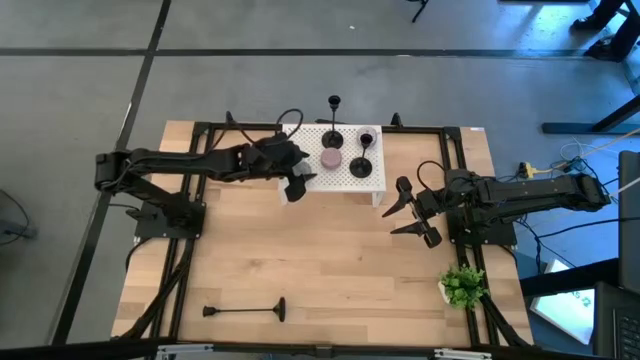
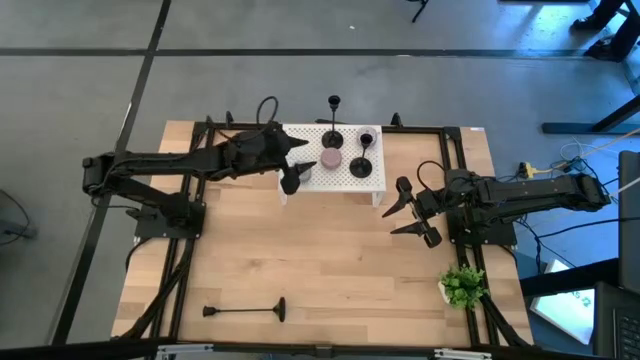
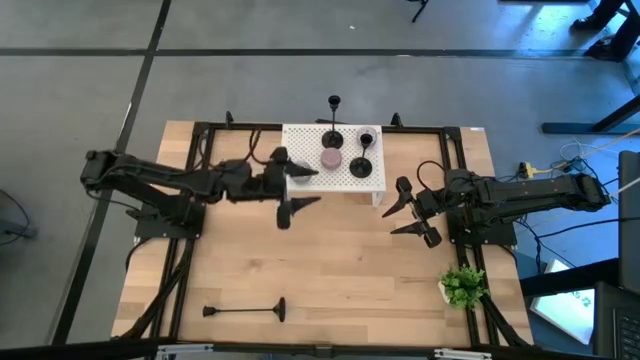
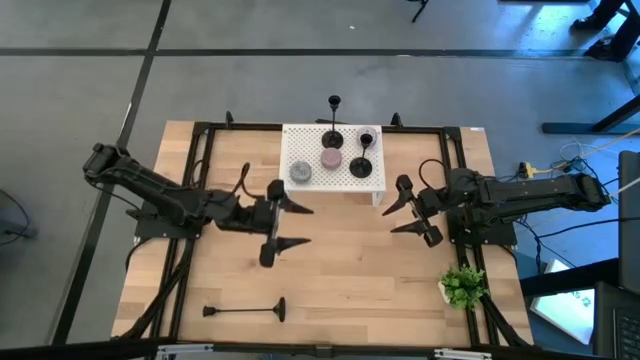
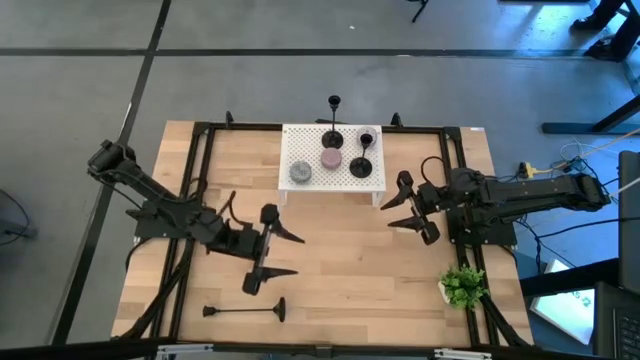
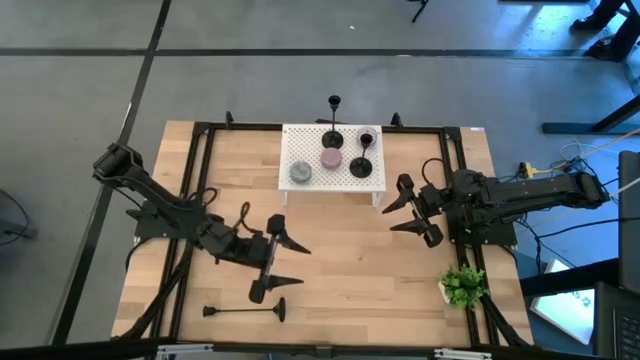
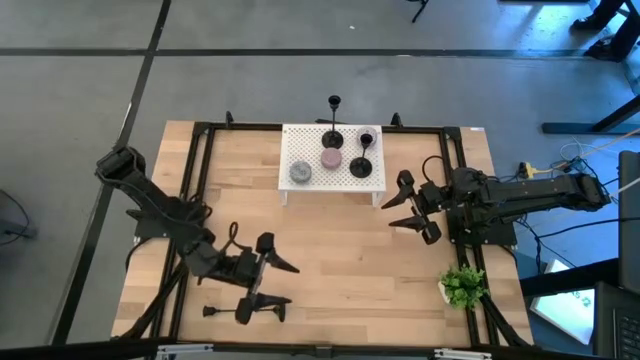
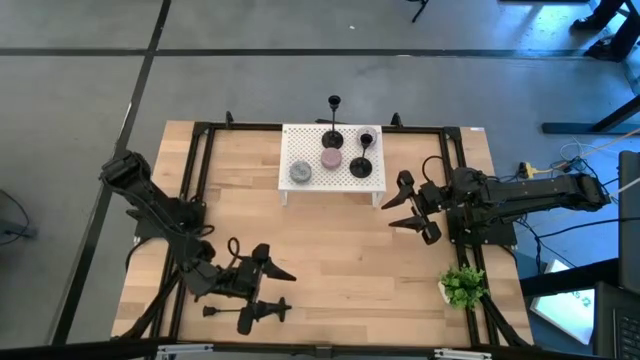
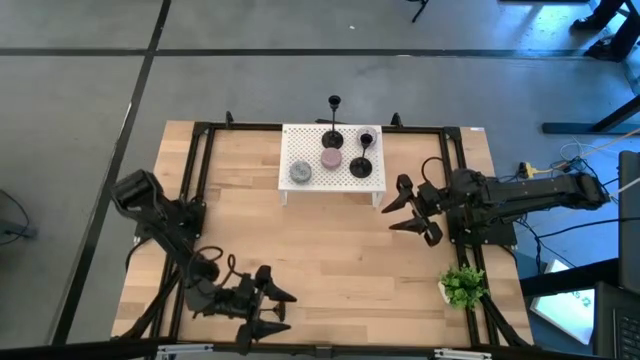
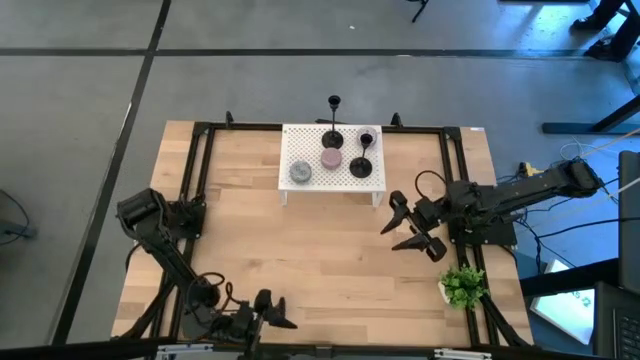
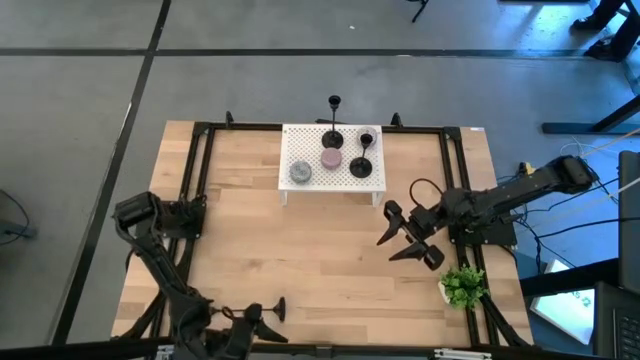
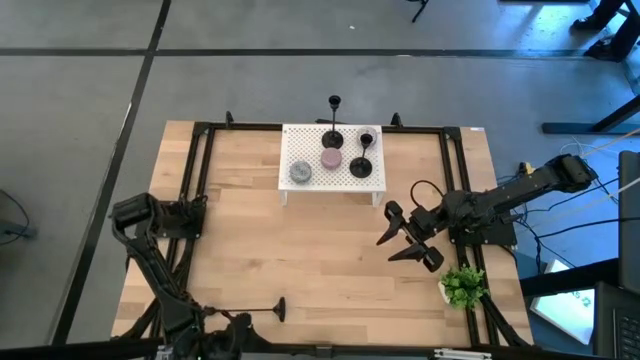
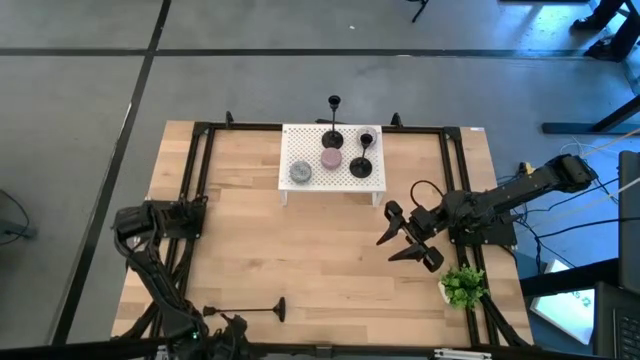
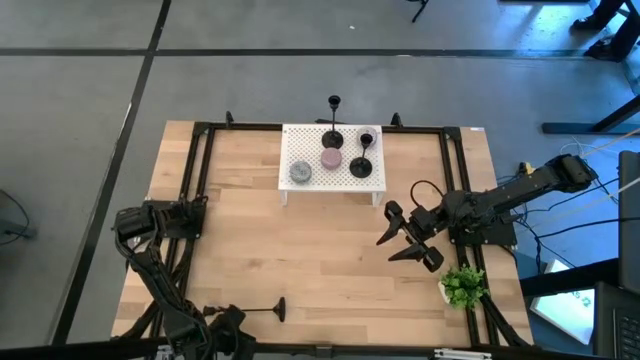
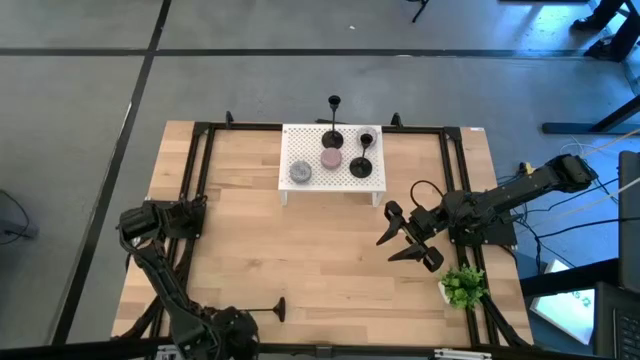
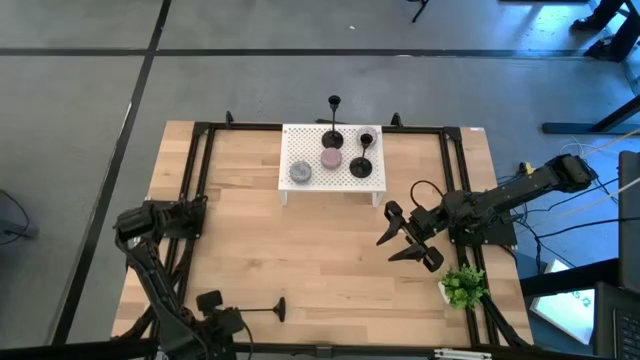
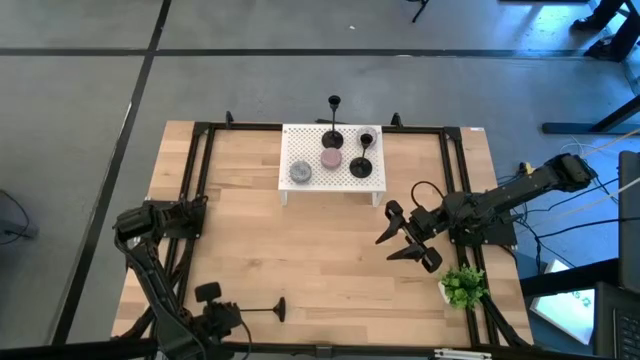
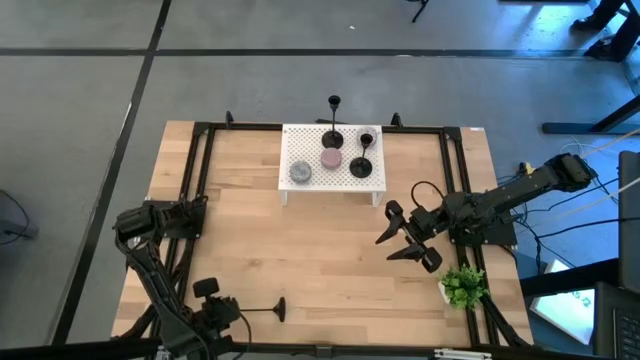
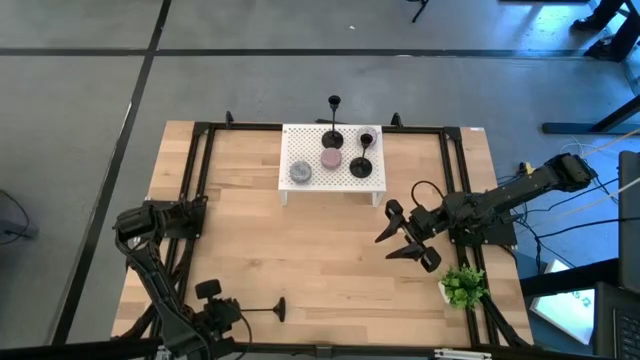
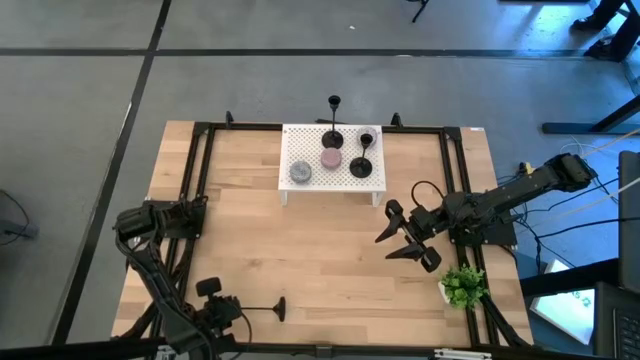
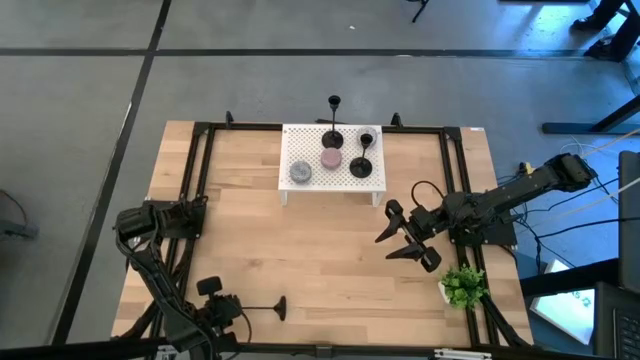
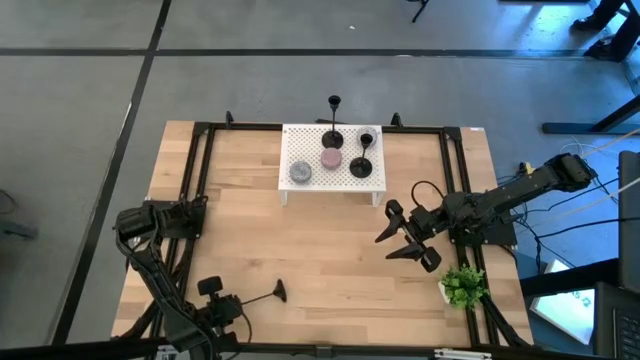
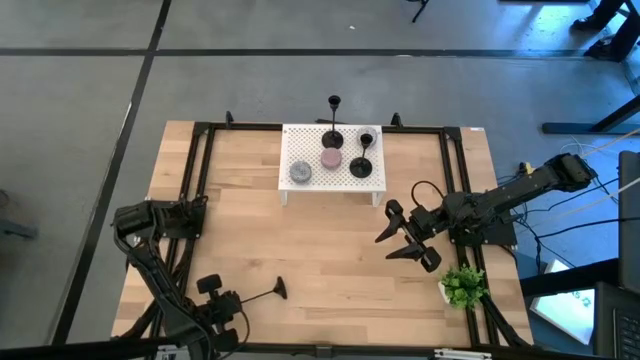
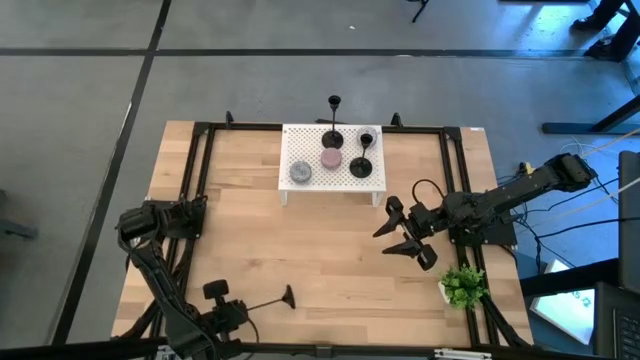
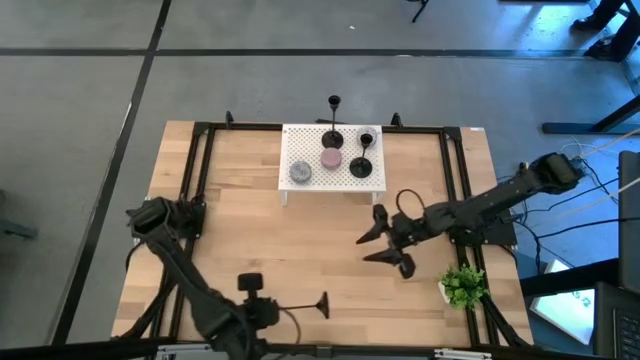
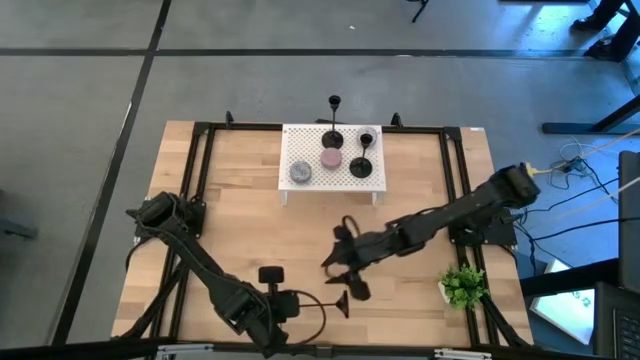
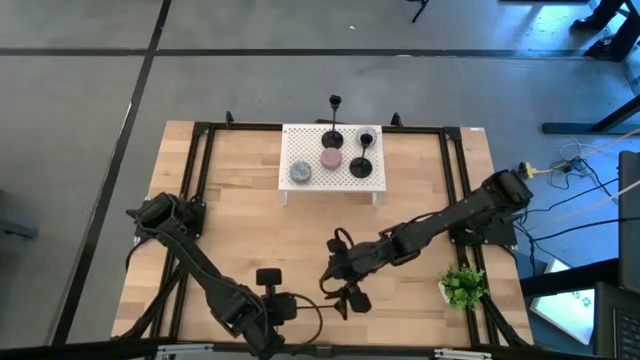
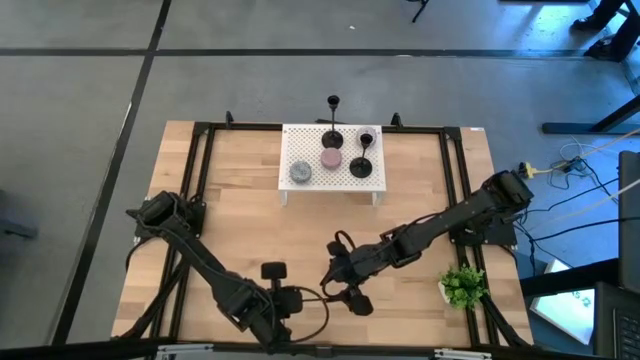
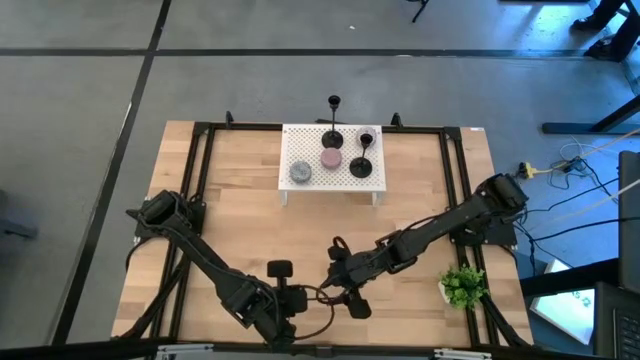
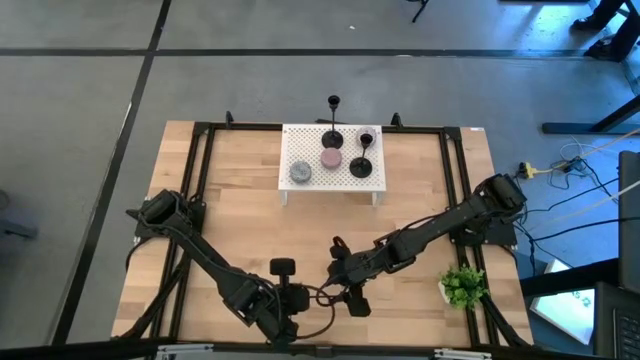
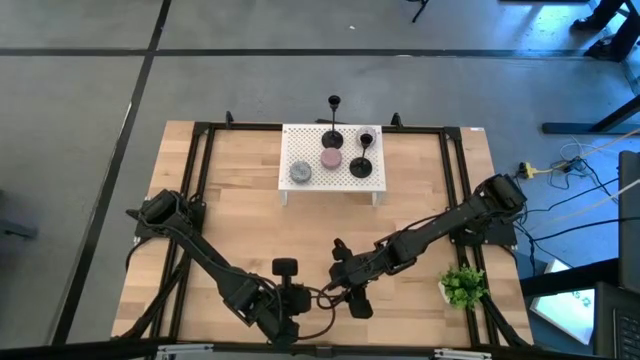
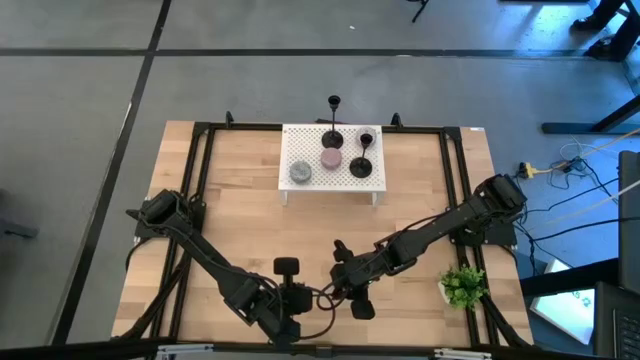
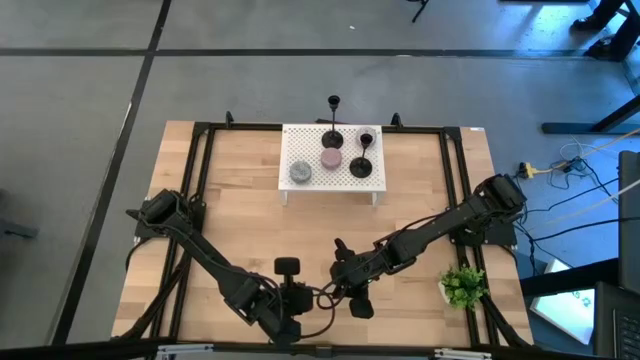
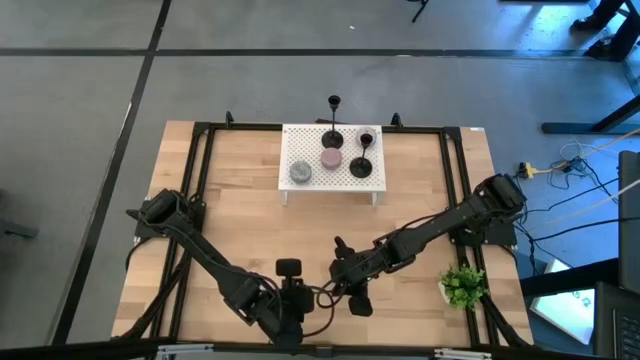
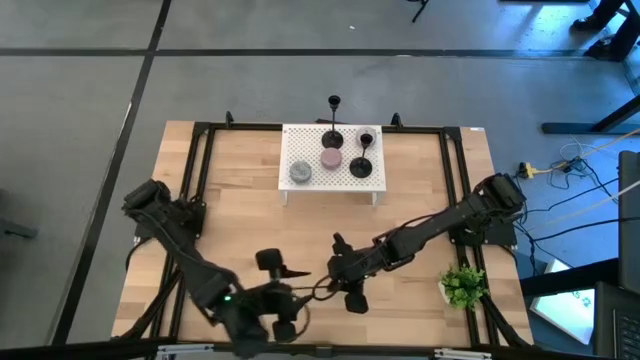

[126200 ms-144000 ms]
Task: Pick & Place candle stick holders
Put the black candle holder on the shelf

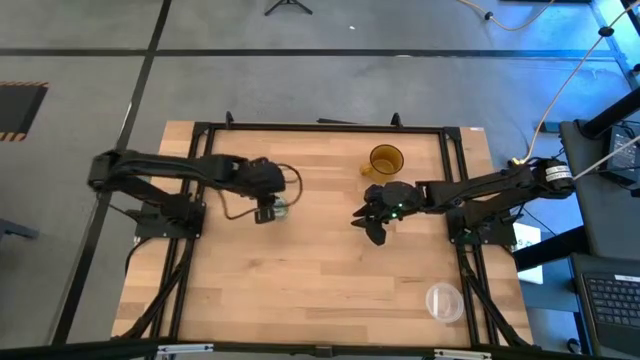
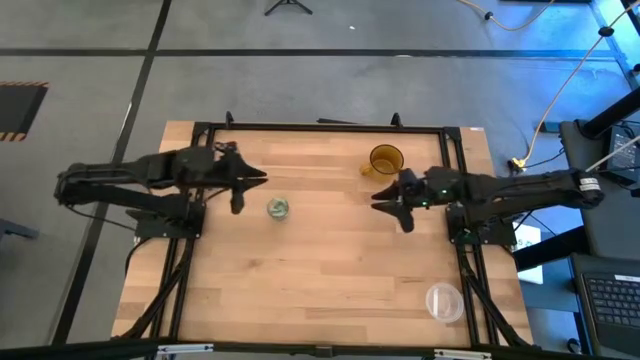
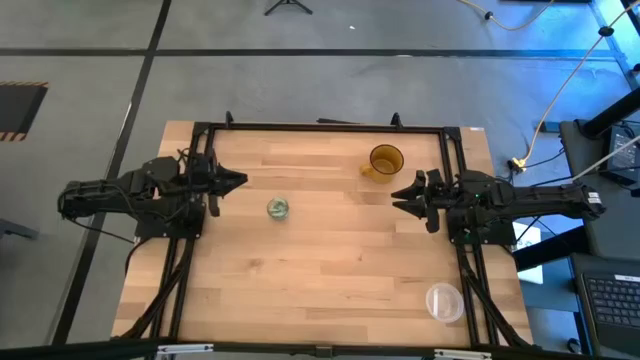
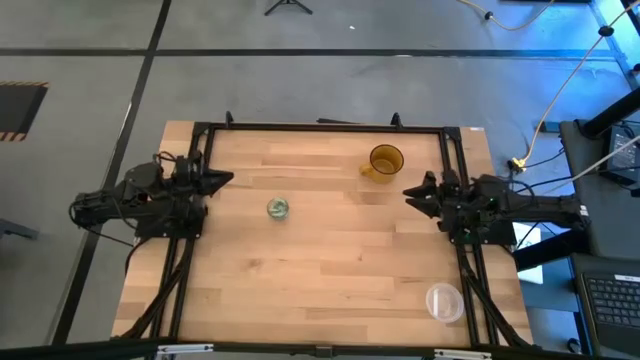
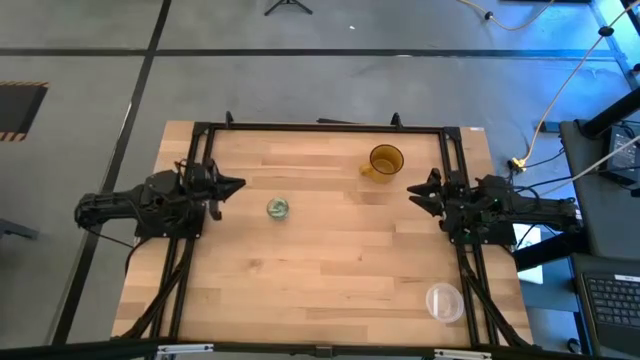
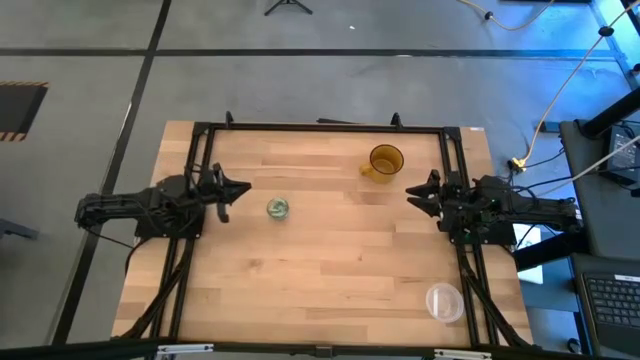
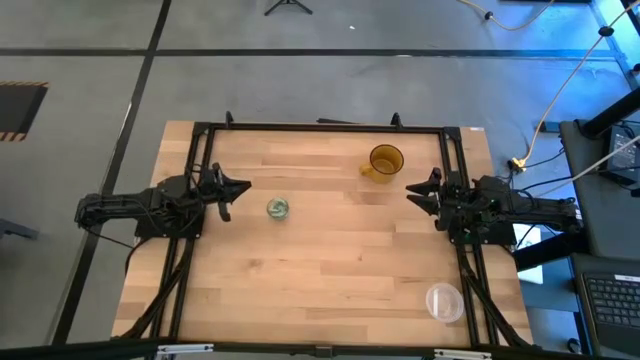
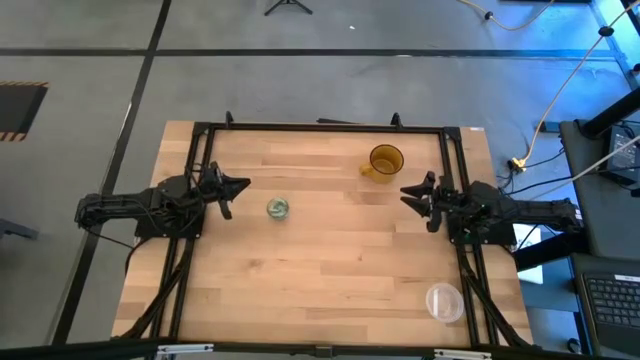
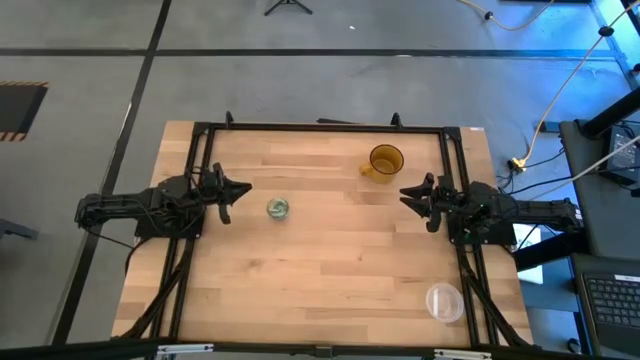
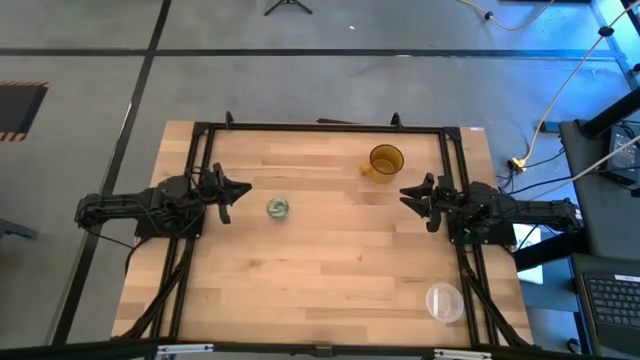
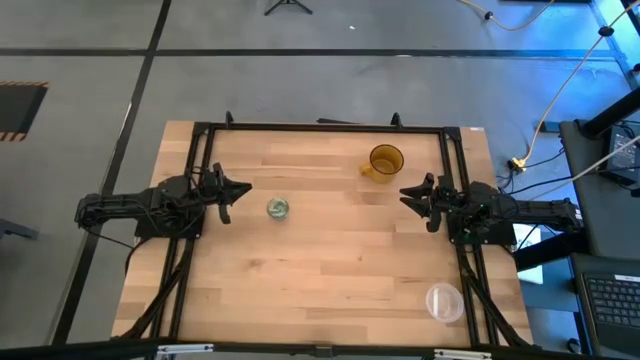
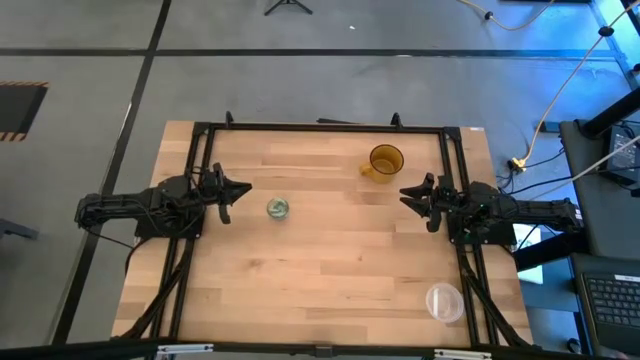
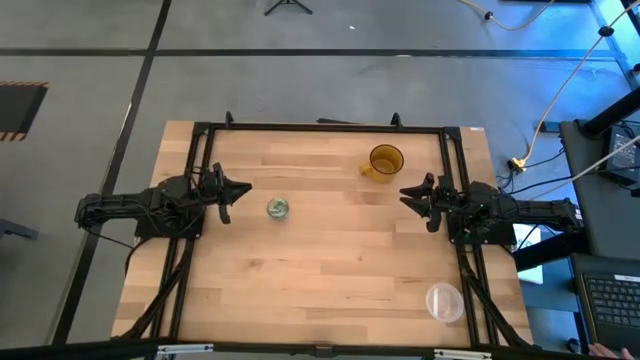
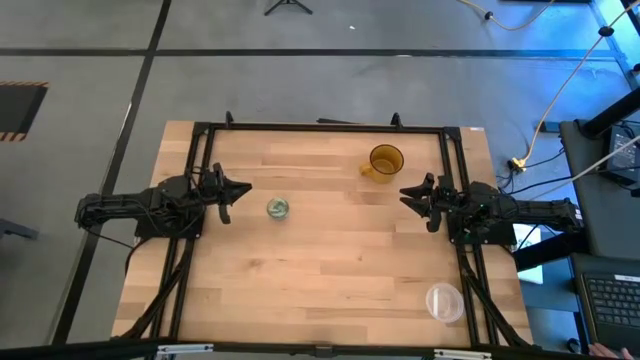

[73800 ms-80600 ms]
Task: Pick and place Stevia / Truvia into bins
Return to Home Position
